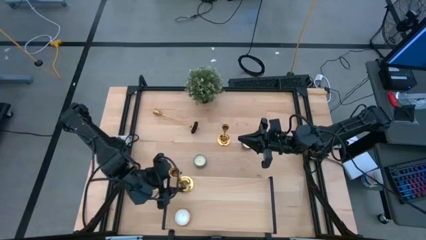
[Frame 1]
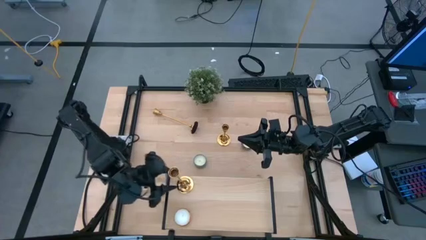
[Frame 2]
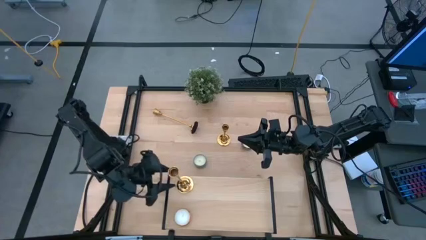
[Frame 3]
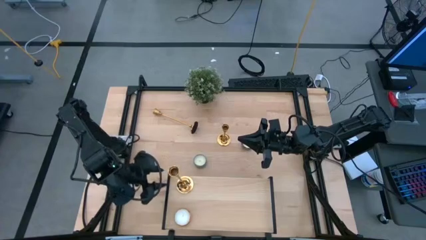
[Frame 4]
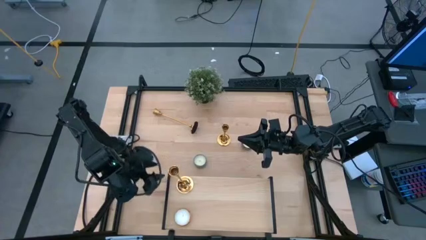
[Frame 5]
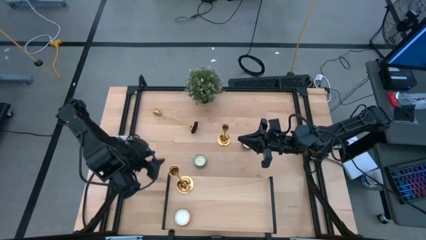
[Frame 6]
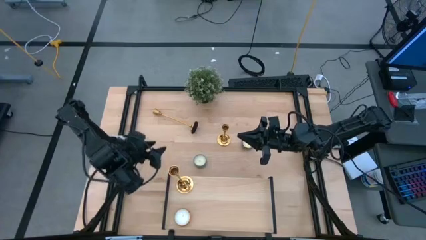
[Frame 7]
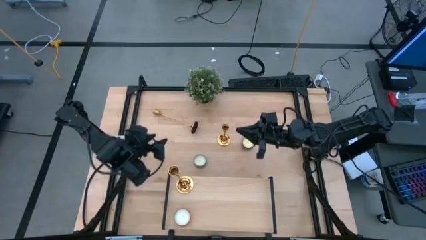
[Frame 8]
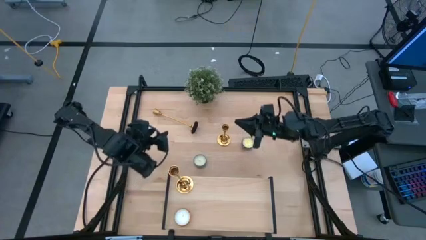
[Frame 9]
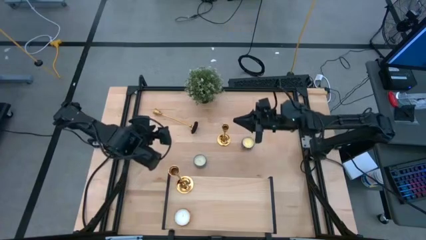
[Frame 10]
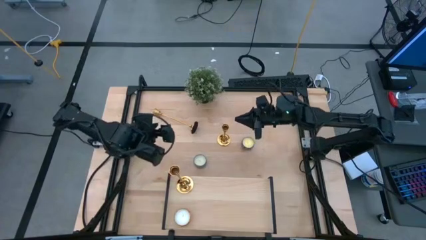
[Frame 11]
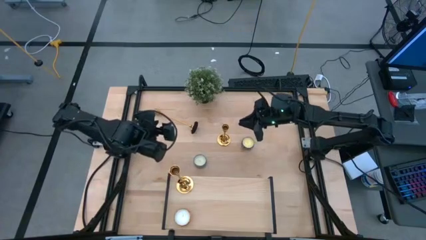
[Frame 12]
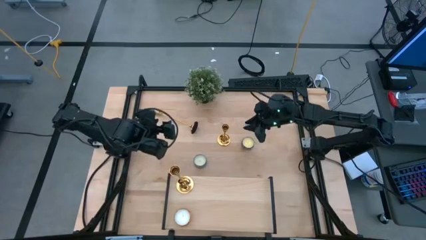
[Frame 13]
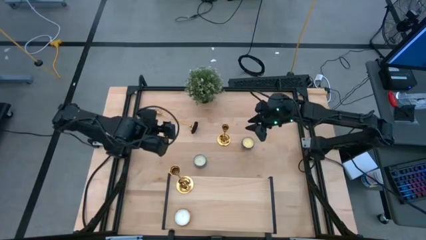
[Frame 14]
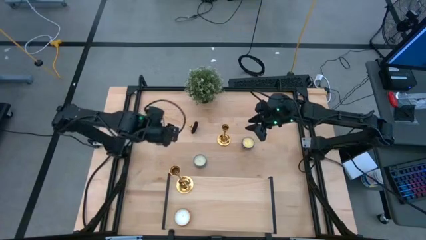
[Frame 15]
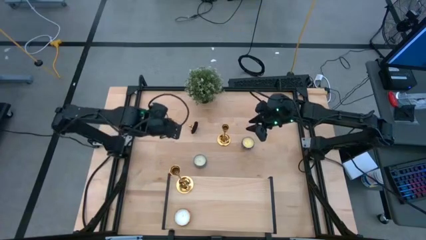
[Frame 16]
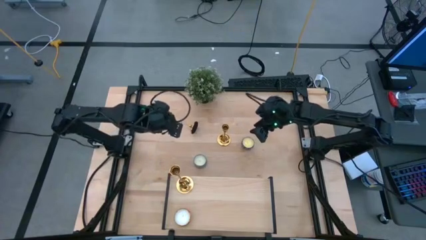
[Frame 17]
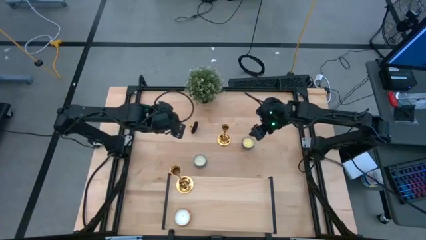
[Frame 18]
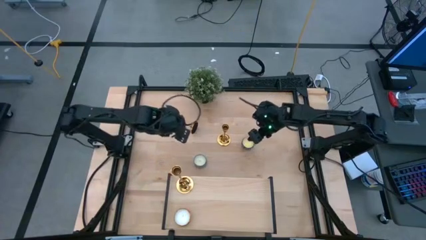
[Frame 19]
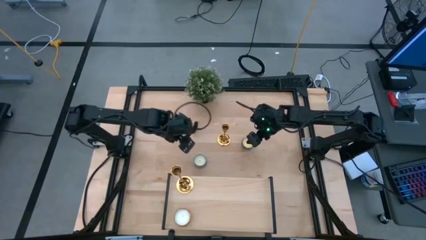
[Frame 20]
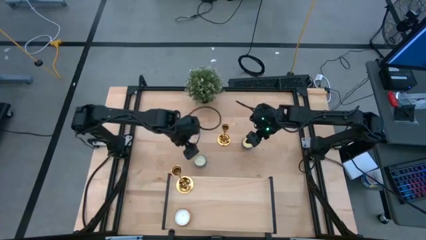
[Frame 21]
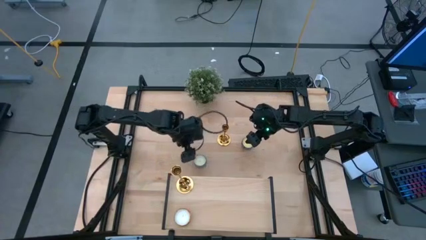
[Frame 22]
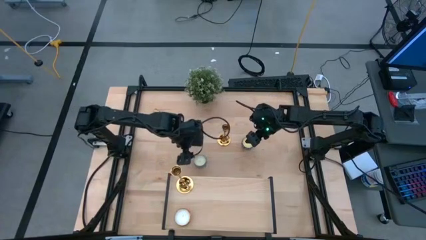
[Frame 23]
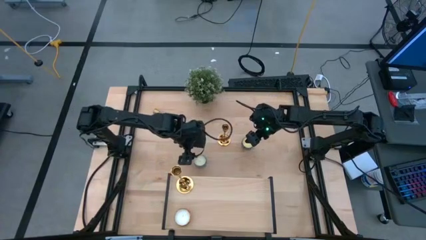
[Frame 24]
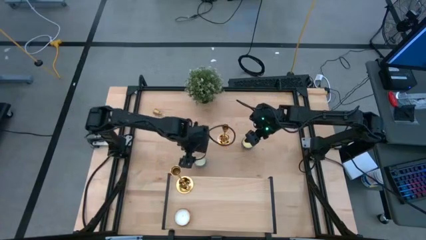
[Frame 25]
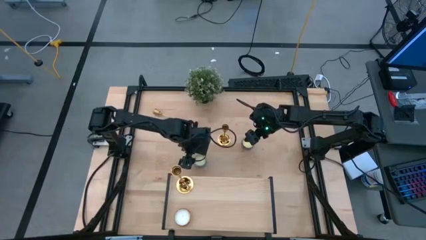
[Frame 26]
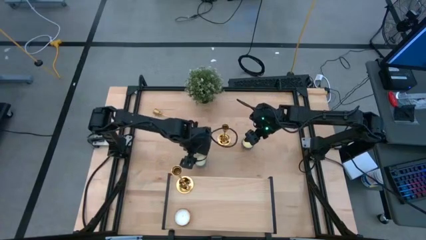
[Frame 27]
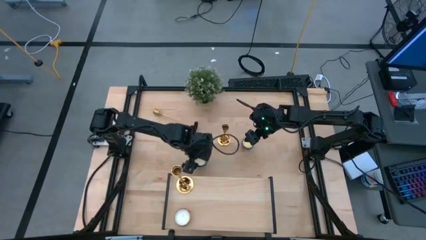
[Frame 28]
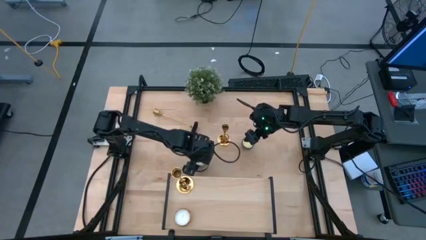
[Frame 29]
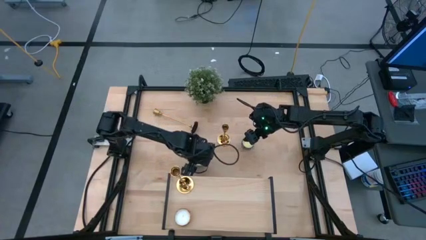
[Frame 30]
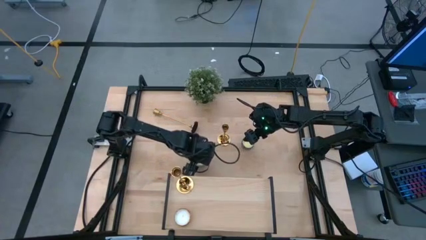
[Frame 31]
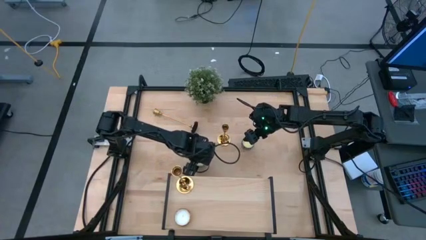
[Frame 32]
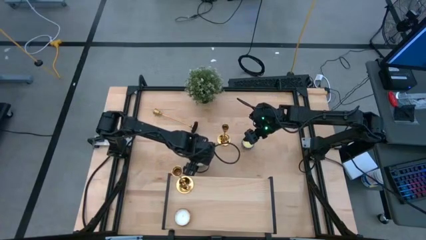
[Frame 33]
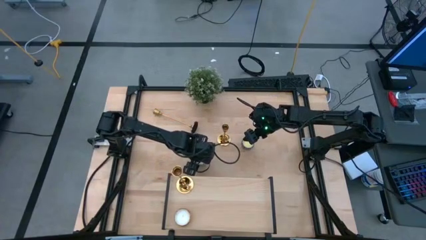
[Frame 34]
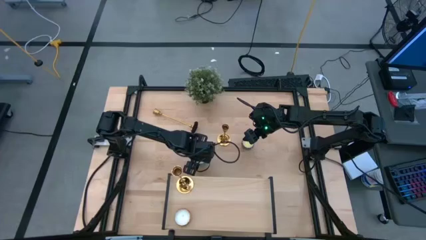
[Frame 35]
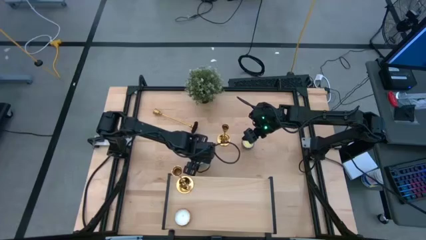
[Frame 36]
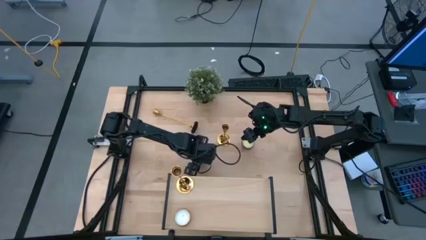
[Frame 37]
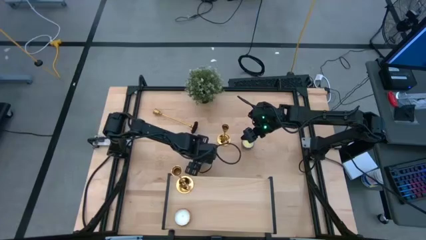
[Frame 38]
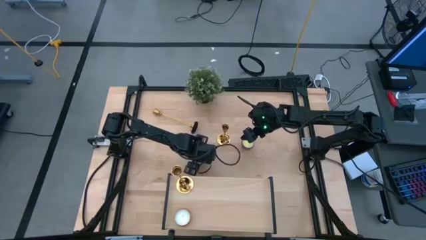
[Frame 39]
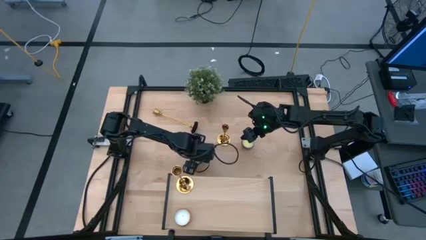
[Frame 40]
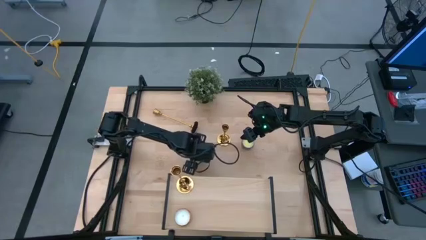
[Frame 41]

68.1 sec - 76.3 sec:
Task: Pick & Place candle stick holders
Put the light blue scented candle on the shelf

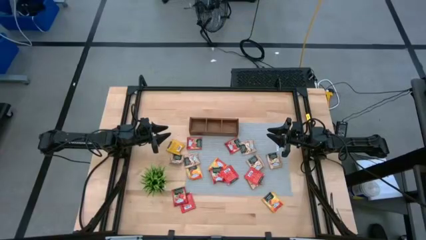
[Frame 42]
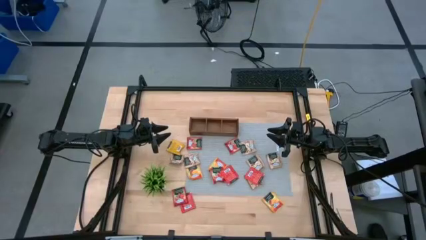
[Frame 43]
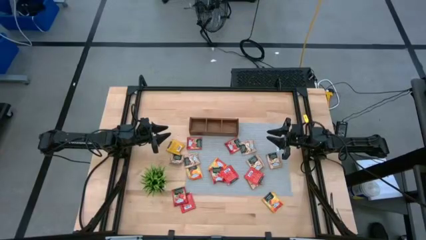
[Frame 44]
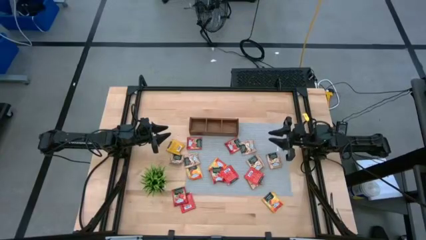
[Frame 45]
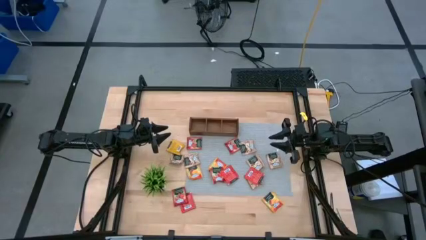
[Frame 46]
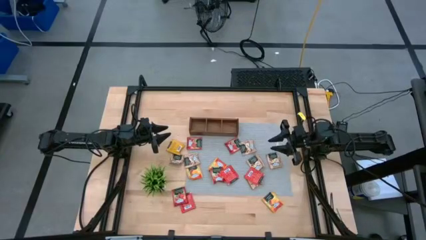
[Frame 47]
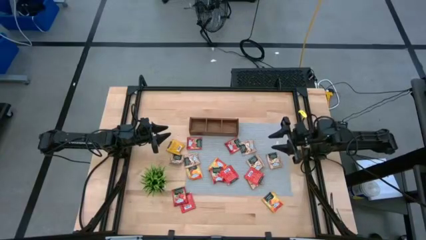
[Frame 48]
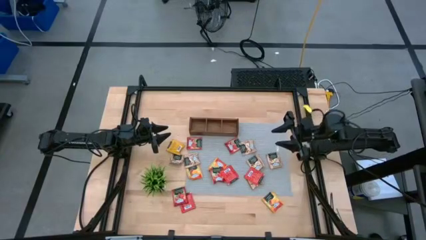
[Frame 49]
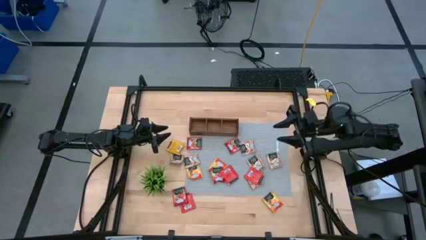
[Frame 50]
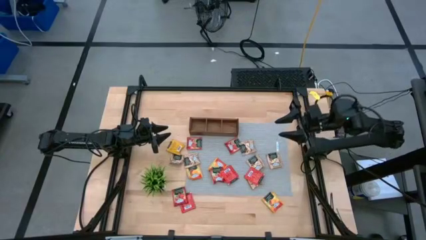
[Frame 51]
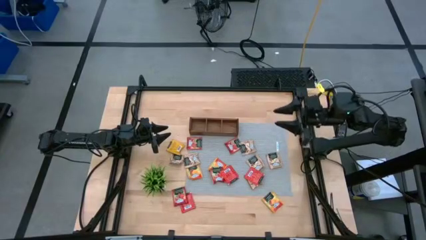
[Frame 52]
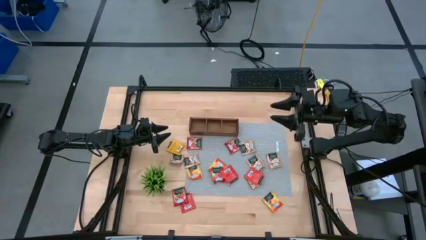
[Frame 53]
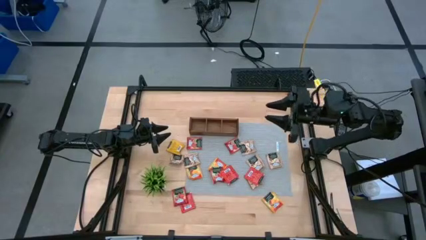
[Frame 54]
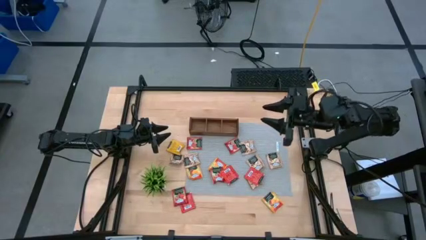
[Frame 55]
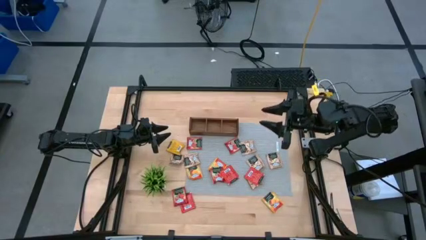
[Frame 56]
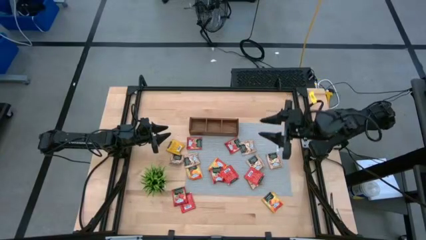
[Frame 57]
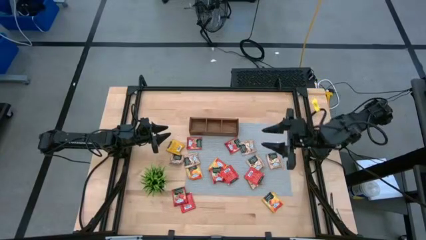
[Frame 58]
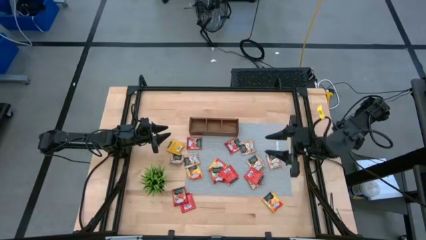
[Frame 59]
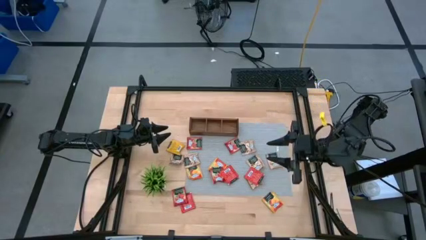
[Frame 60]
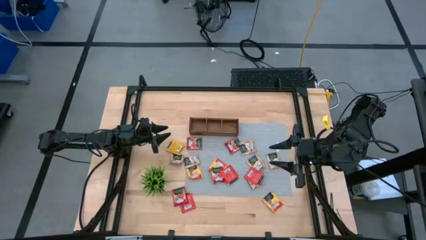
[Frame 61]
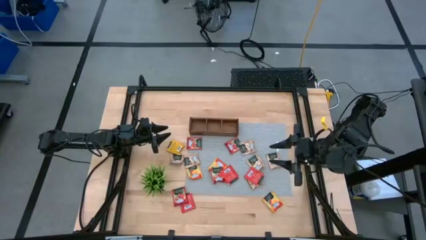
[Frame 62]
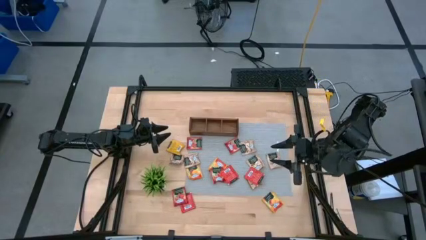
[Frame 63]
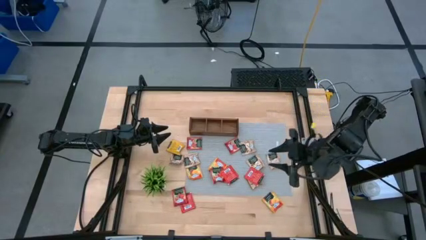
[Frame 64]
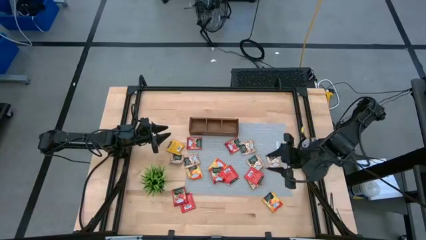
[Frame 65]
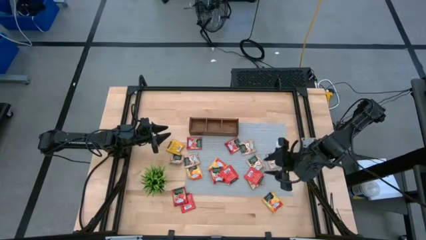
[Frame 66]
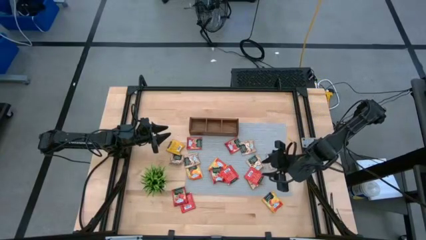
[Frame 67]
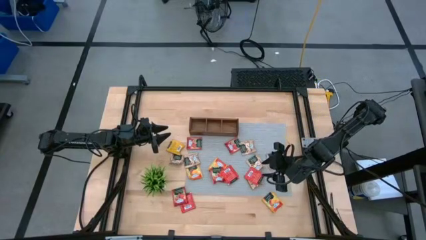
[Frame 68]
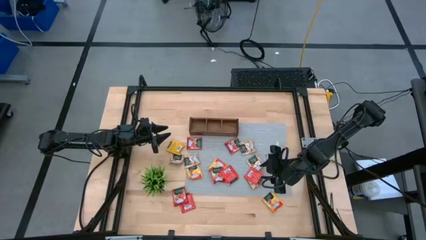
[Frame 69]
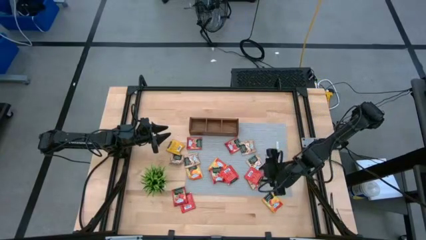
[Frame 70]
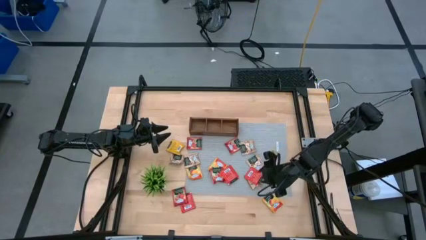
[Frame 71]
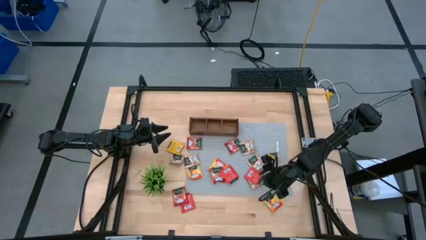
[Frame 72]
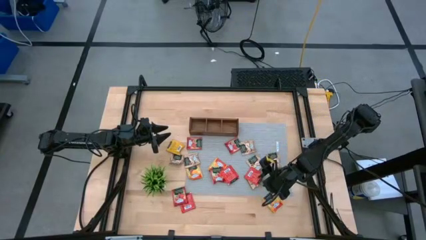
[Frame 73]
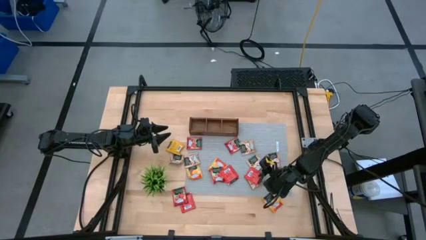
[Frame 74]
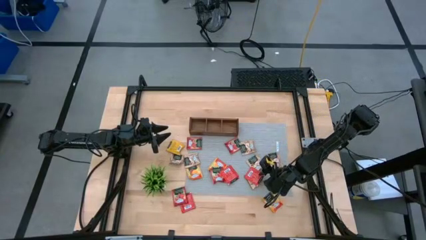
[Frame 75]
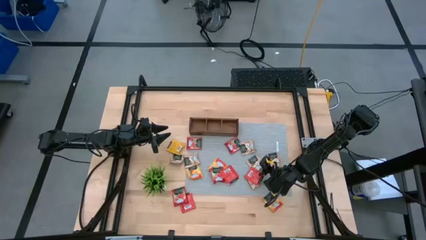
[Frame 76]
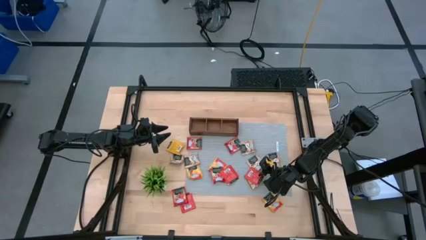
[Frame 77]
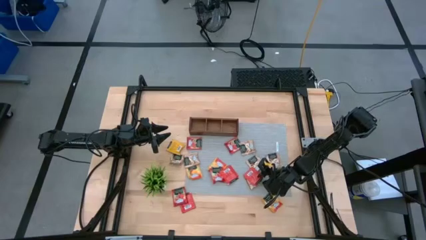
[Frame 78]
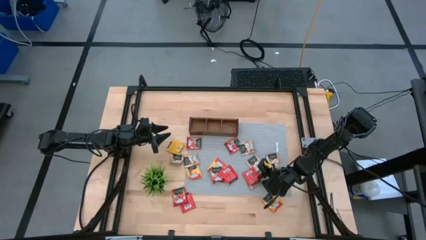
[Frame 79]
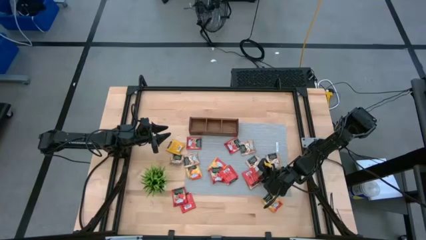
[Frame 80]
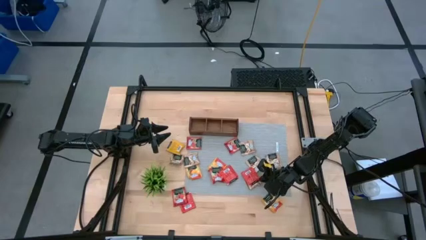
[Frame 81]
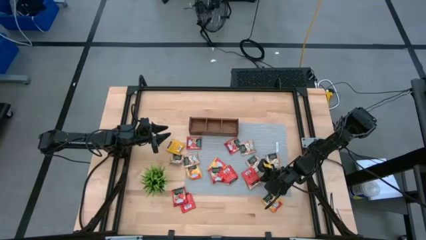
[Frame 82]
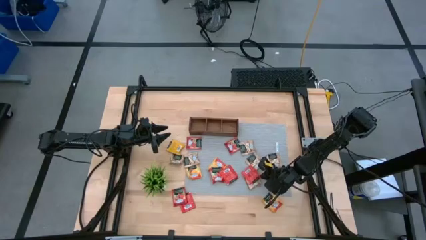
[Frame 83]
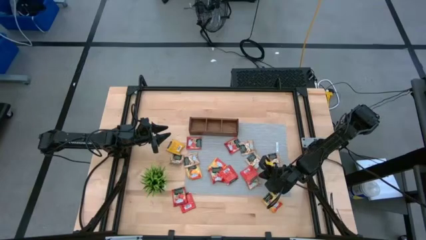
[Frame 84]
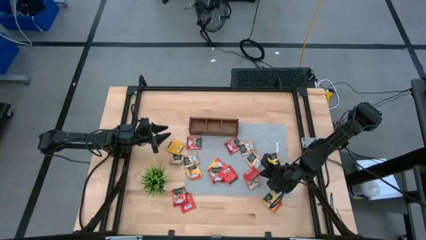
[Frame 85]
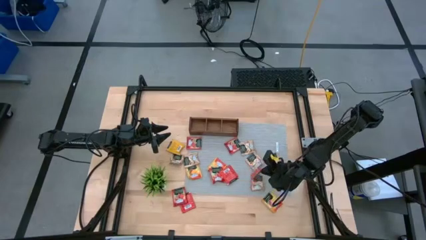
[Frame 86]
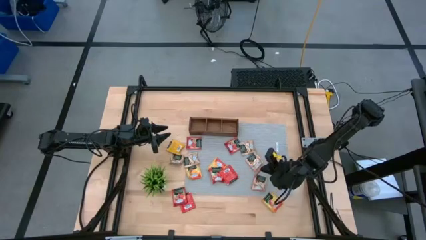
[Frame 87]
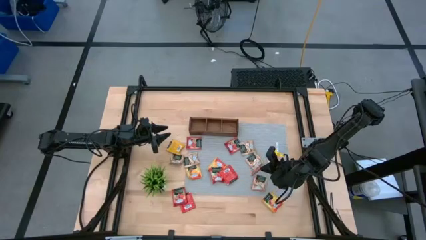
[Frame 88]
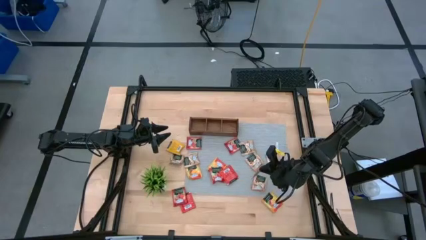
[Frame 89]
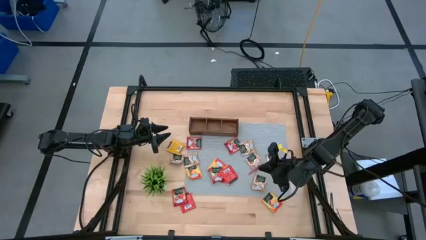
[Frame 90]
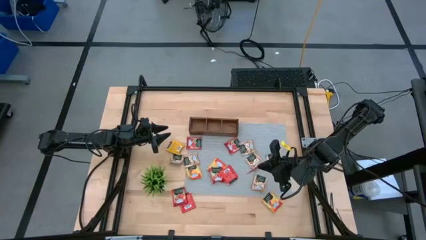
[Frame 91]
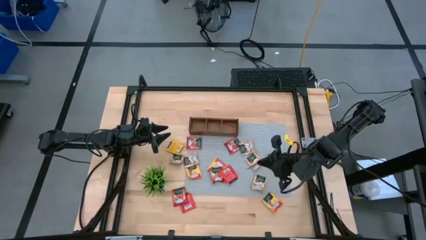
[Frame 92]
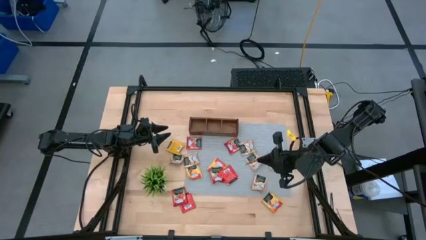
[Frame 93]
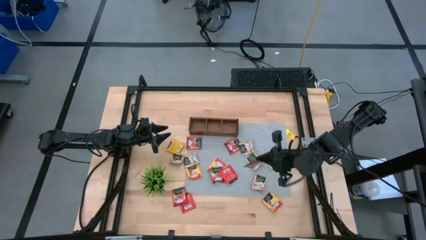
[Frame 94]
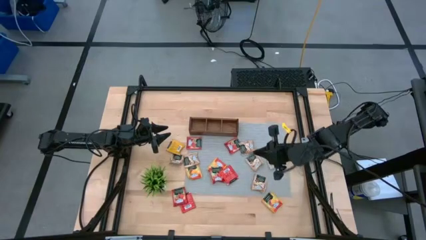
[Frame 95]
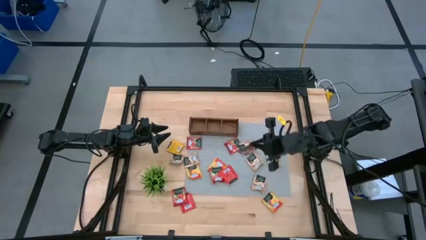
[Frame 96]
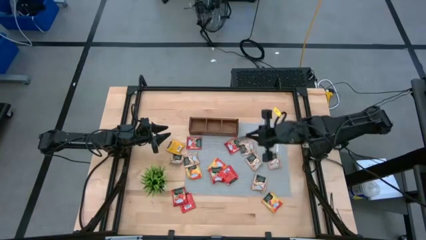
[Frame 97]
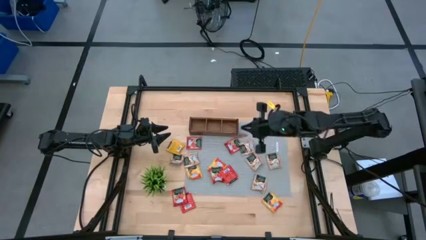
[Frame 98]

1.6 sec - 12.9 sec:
Task: Pick & Place Tea
Put the red tea bag into the right section of the wooden organizer
